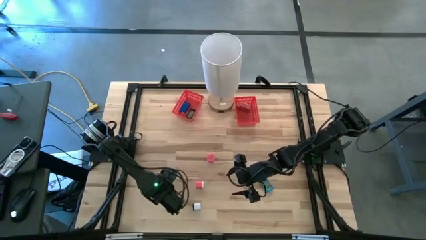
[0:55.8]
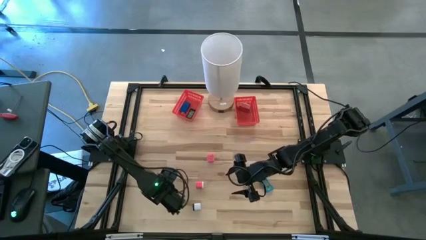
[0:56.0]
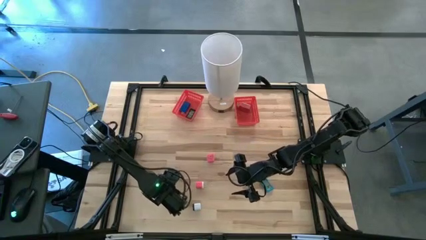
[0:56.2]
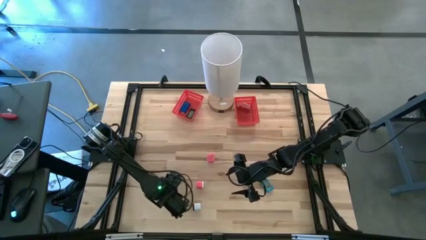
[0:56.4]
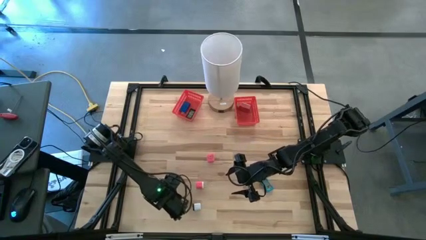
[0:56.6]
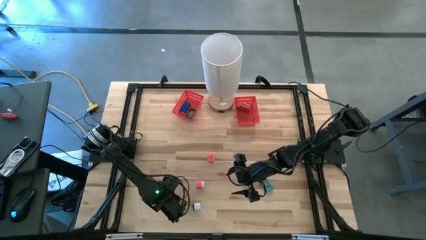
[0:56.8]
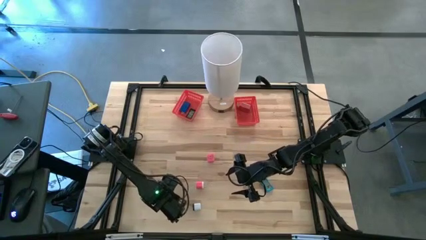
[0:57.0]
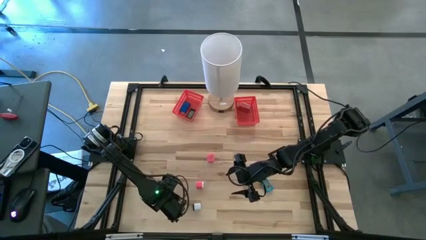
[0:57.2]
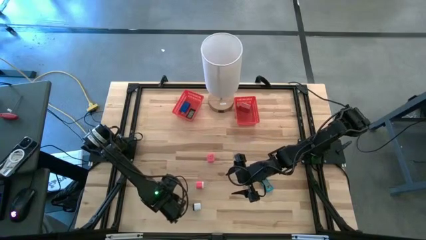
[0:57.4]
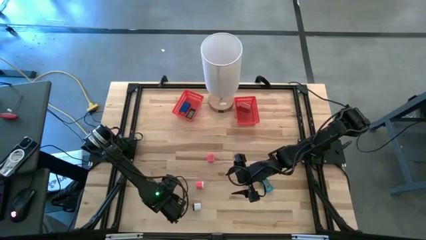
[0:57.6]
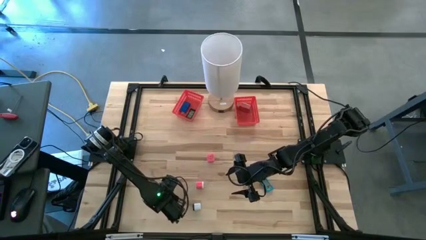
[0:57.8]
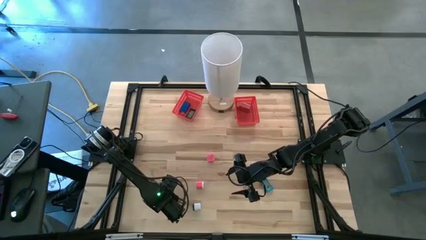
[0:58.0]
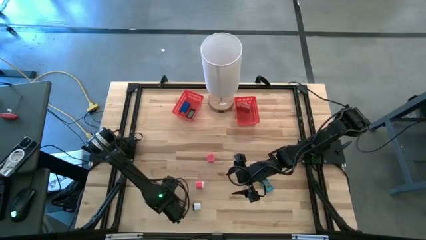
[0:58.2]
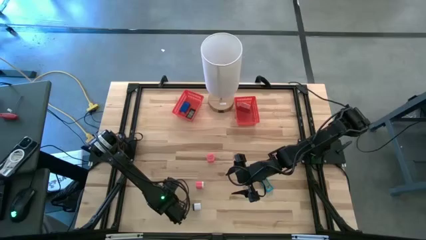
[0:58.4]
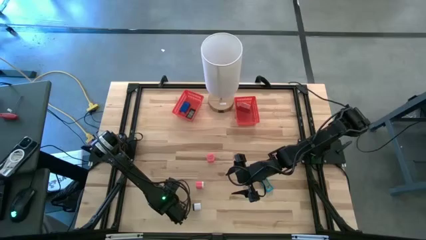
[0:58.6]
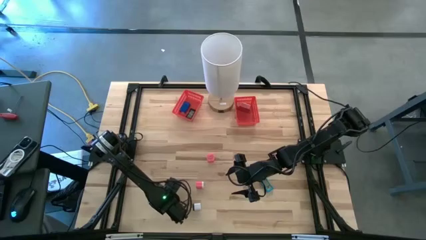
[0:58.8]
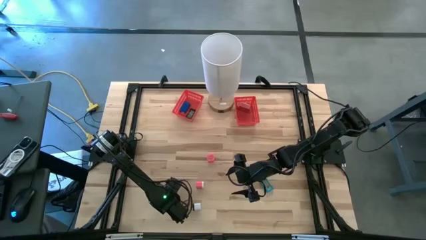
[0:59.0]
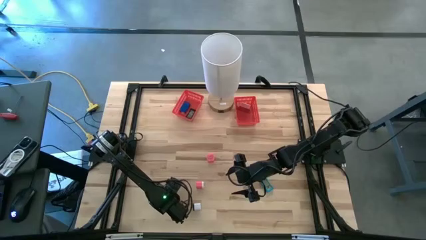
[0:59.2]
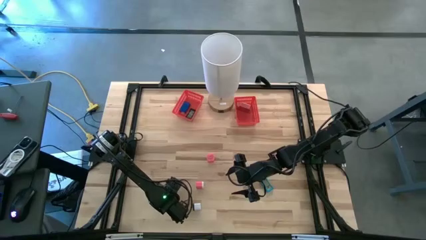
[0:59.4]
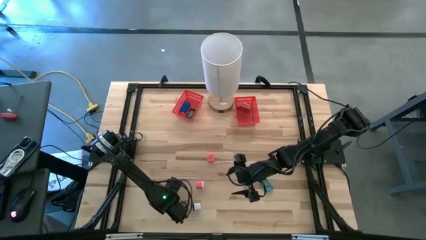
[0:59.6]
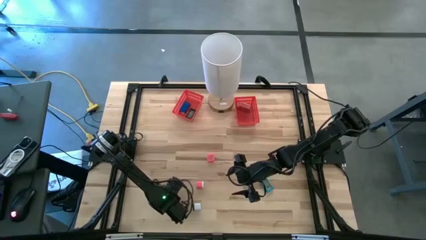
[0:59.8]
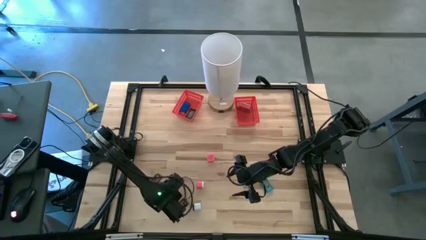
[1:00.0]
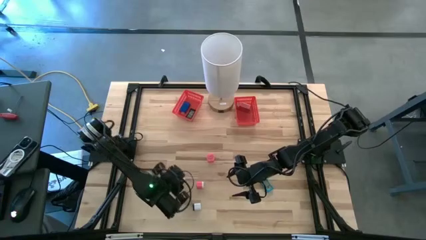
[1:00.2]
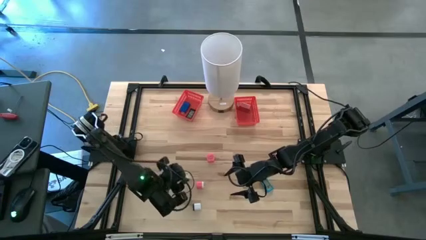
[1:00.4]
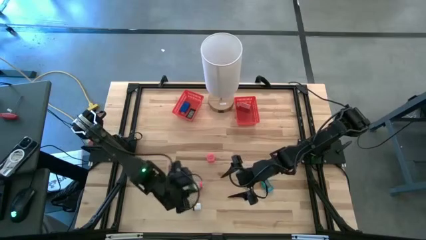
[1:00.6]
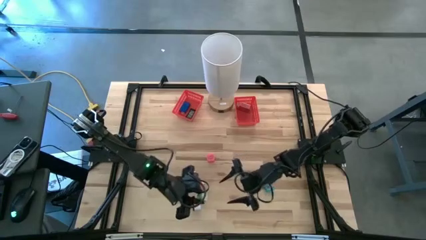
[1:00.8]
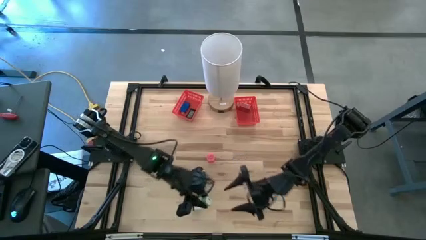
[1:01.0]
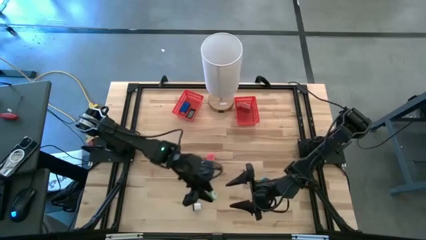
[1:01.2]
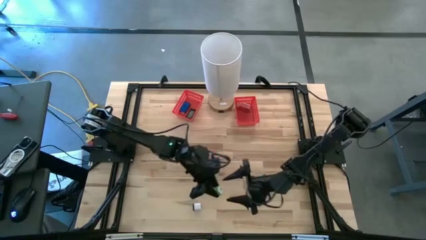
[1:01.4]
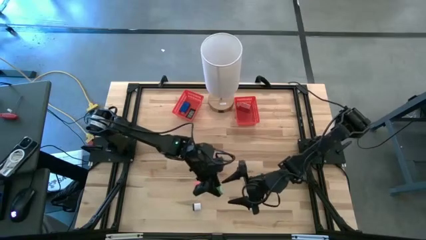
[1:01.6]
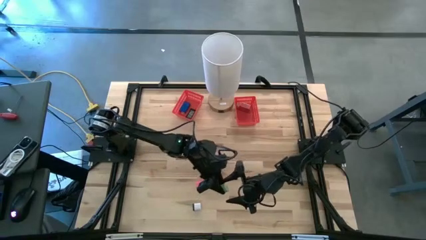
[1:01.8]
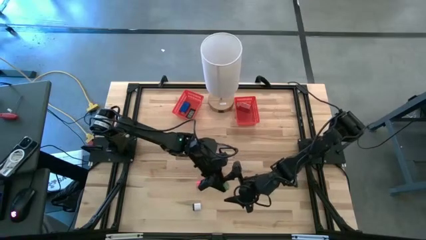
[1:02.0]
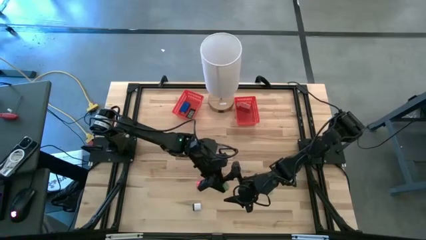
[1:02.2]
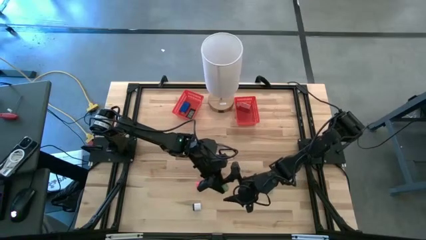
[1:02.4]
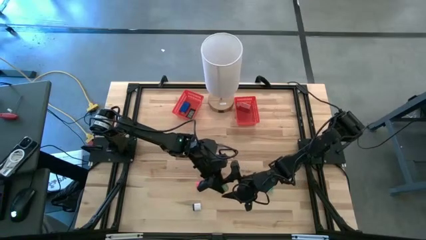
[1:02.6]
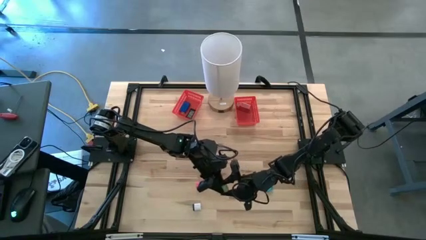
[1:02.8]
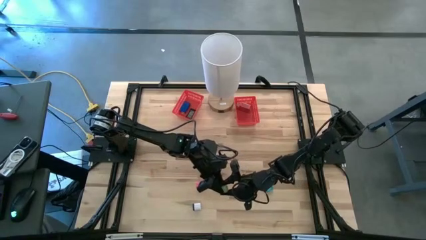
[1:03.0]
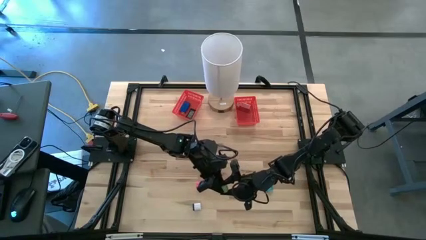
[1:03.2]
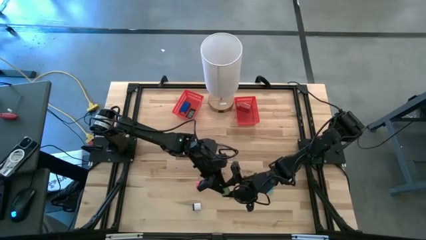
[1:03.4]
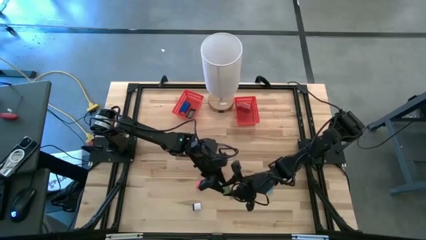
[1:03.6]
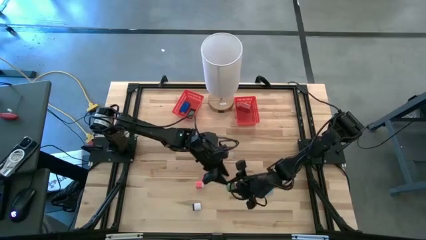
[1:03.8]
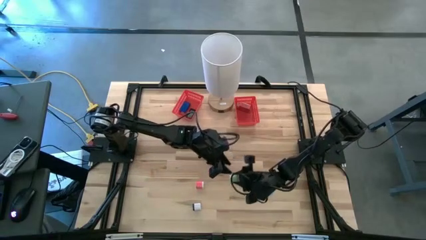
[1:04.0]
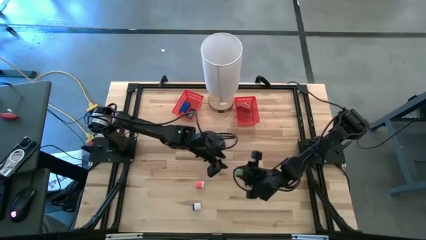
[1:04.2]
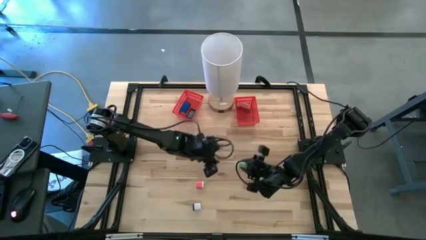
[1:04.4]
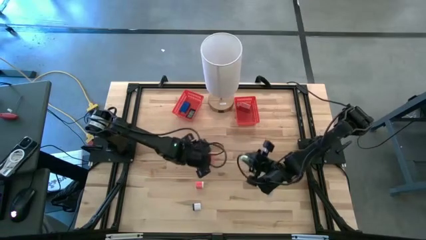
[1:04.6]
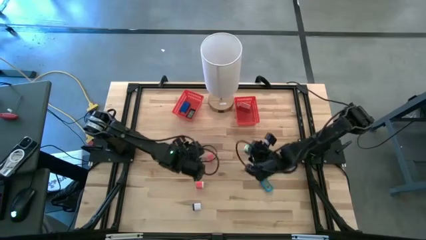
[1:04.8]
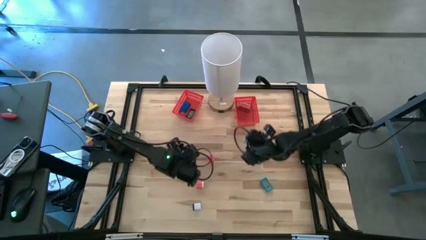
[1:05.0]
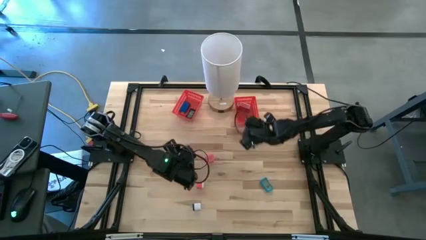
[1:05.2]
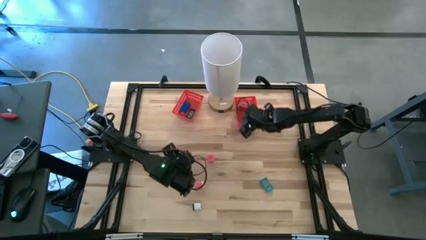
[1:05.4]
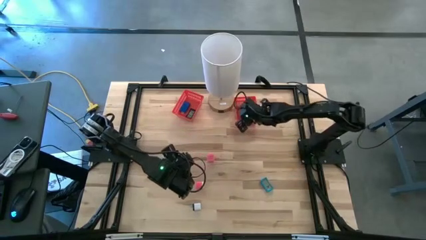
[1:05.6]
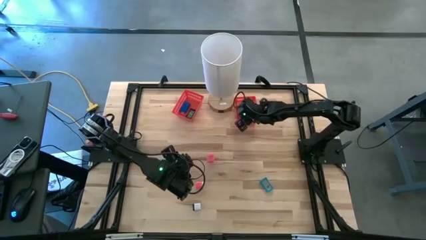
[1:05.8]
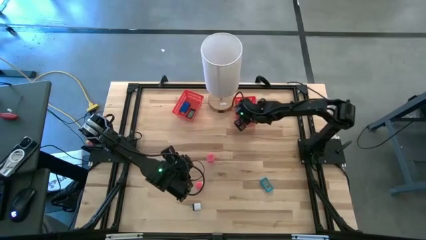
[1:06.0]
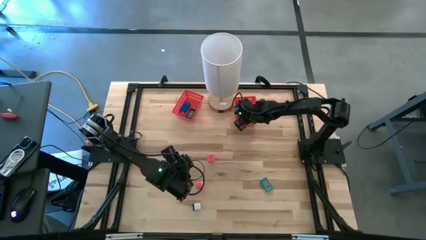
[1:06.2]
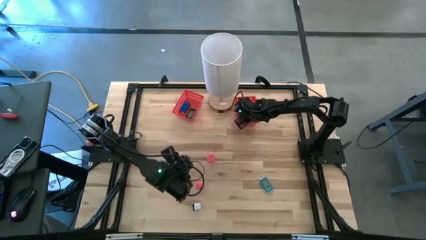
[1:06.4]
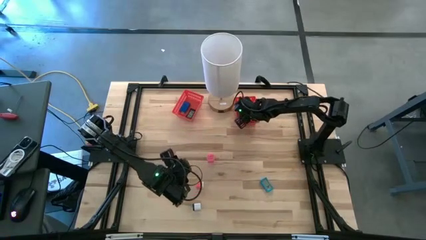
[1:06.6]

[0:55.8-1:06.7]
Task: Sort adapters and digital timers
Put the green charger adapter into the right red bin
